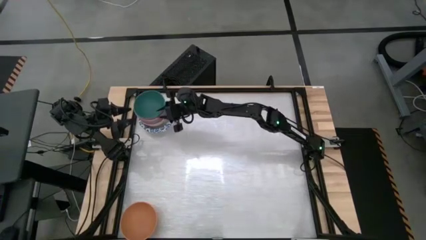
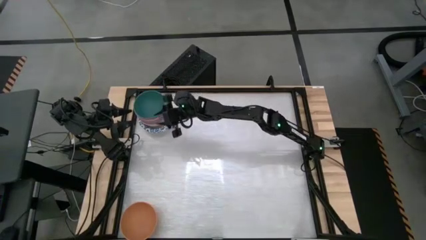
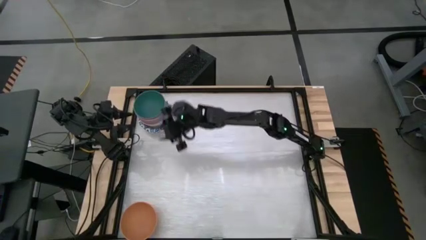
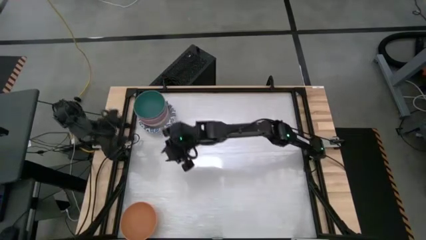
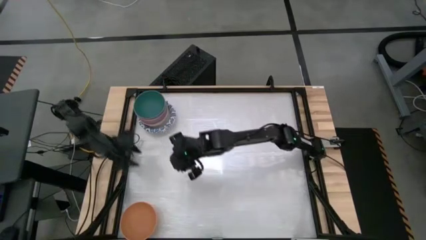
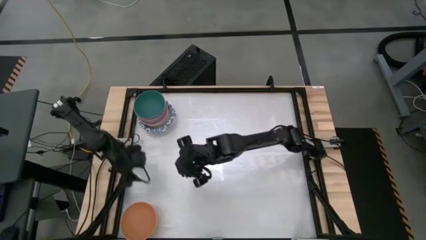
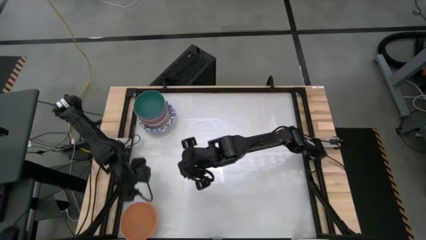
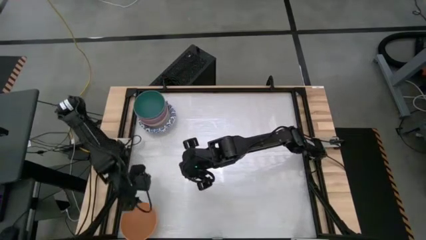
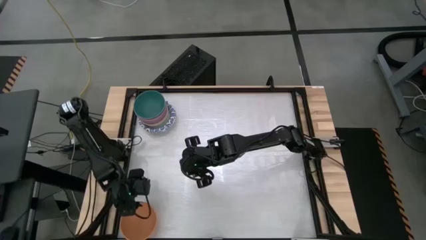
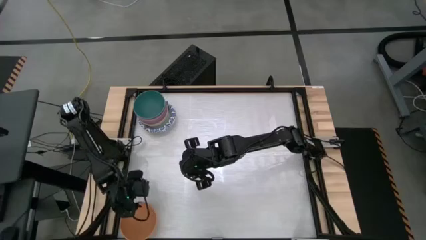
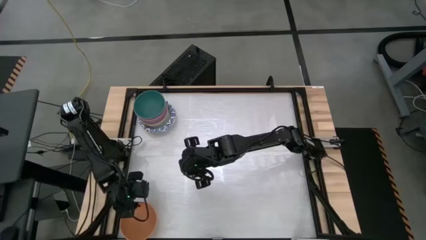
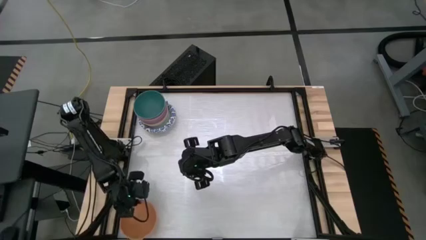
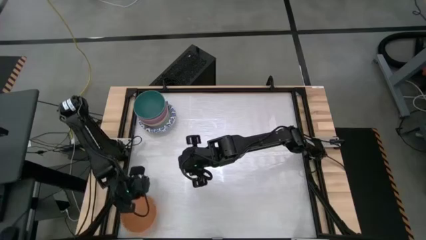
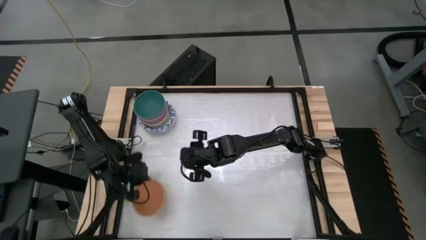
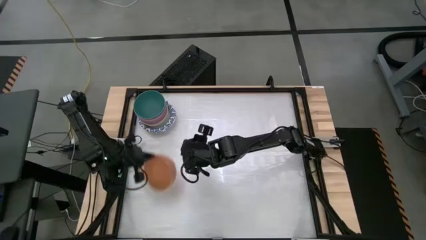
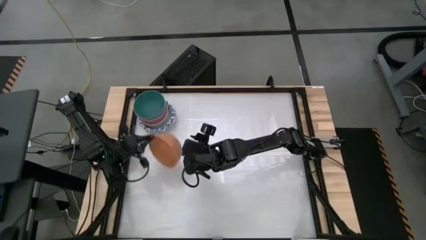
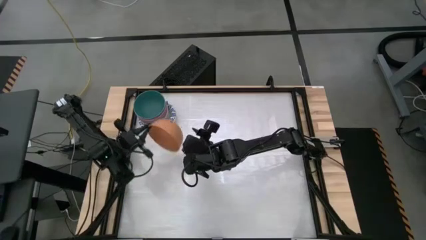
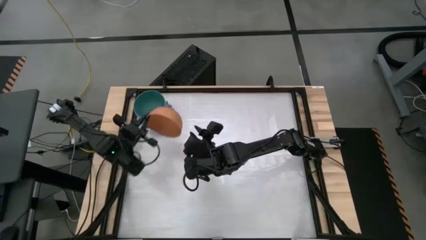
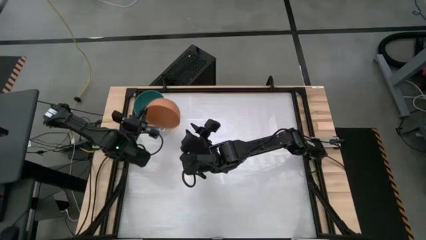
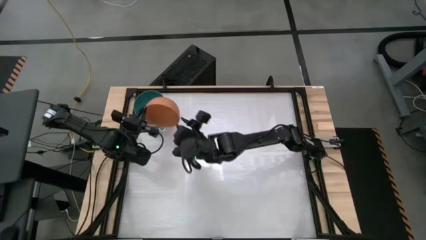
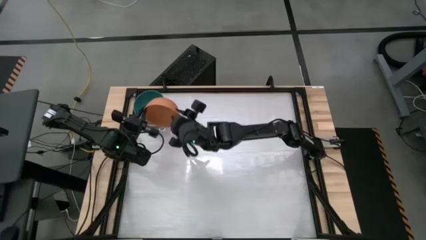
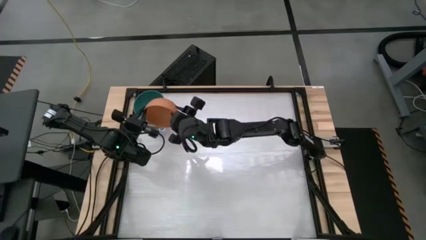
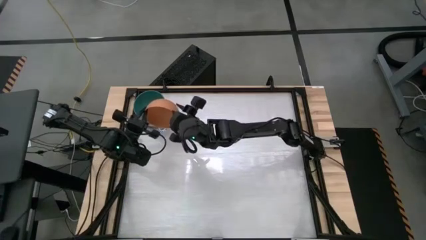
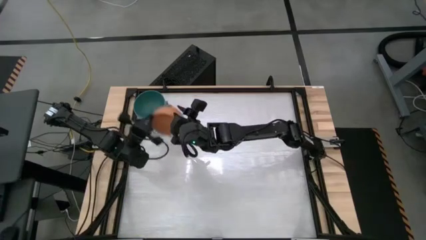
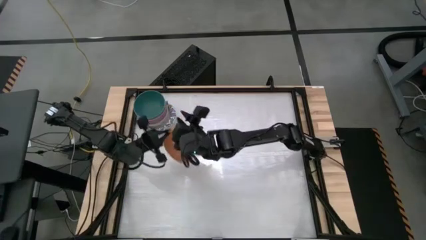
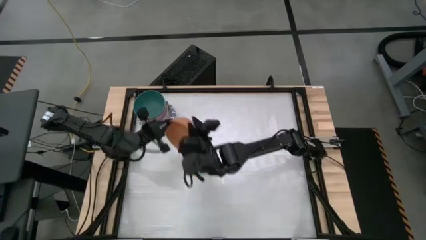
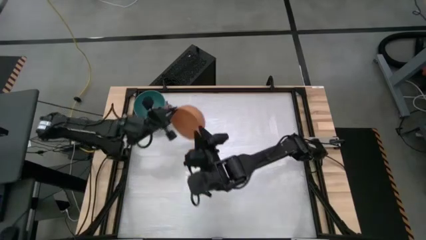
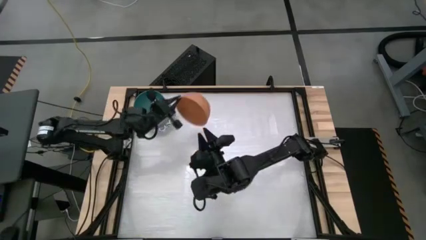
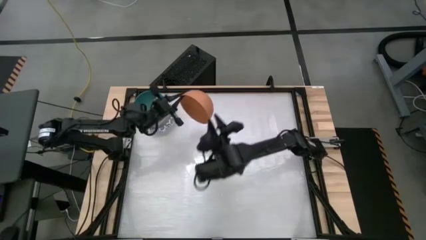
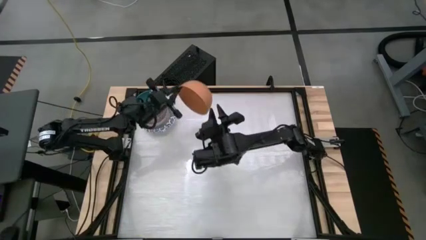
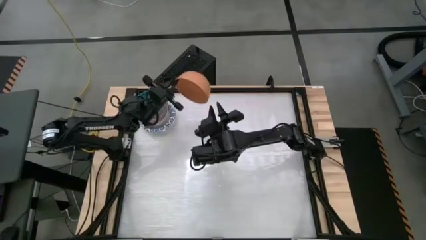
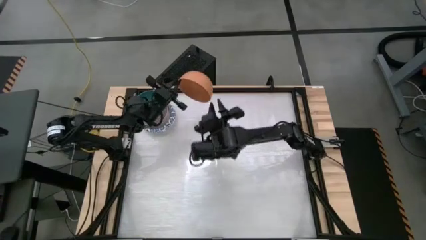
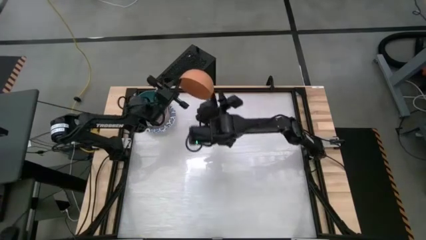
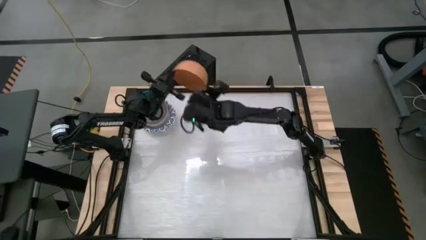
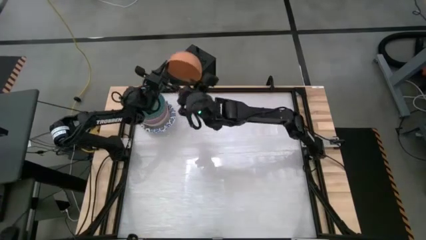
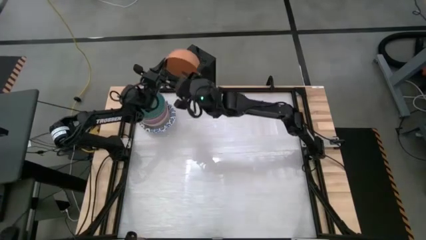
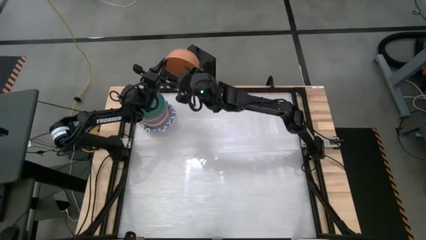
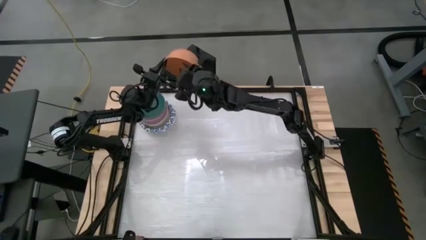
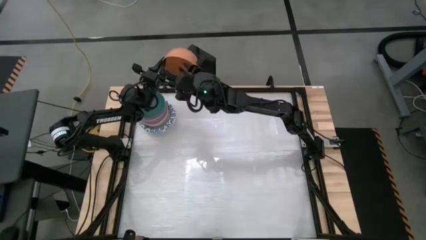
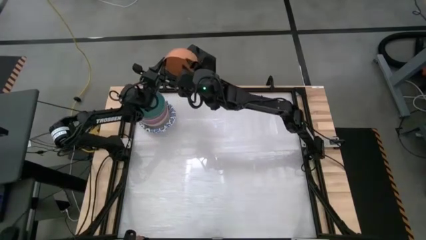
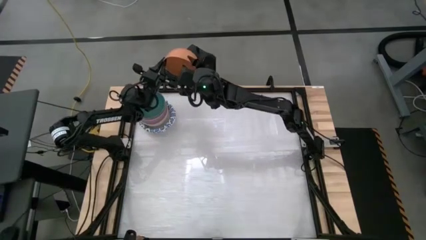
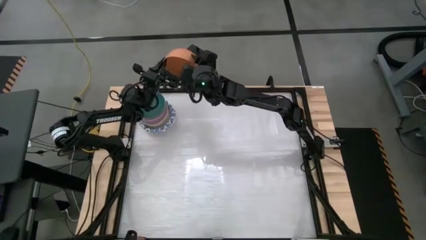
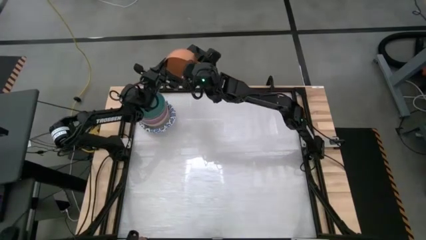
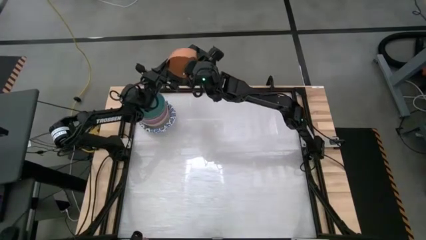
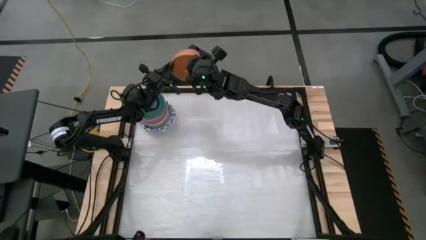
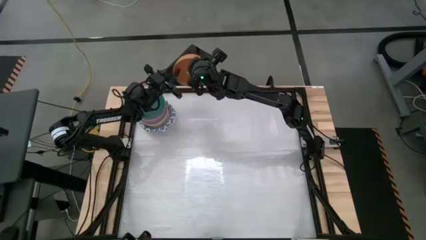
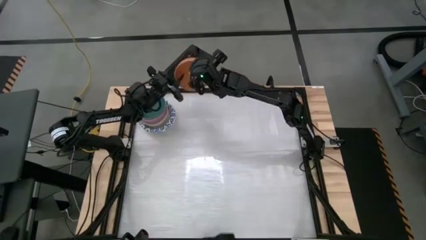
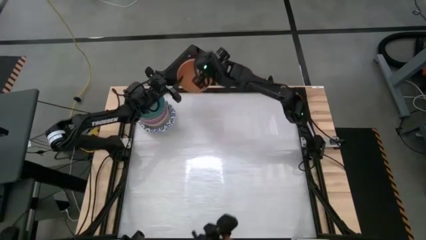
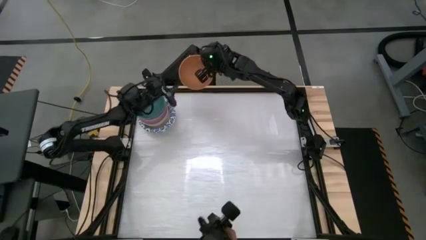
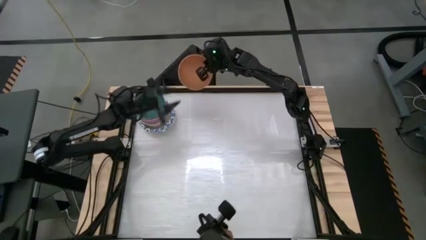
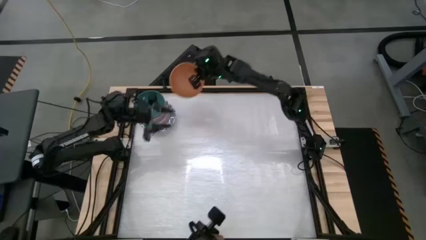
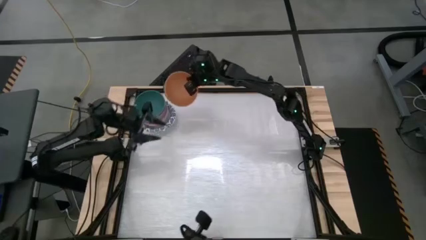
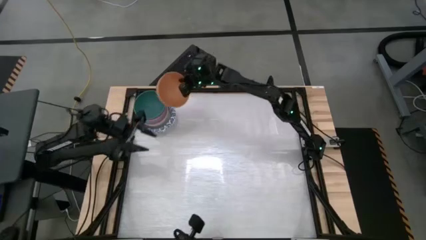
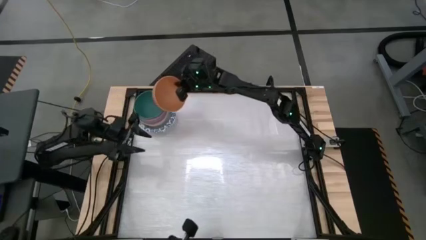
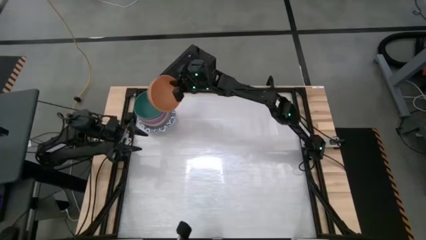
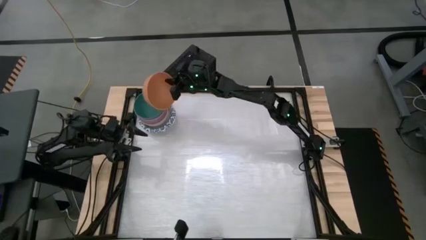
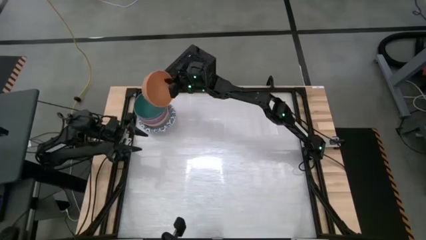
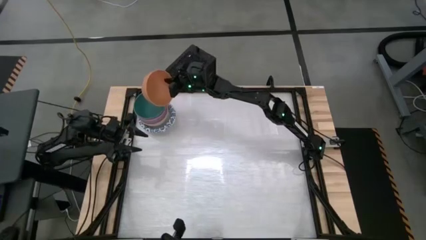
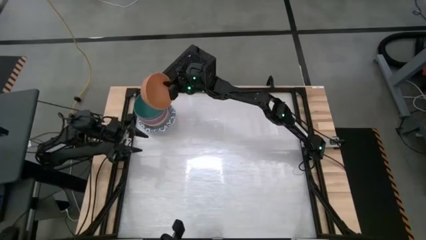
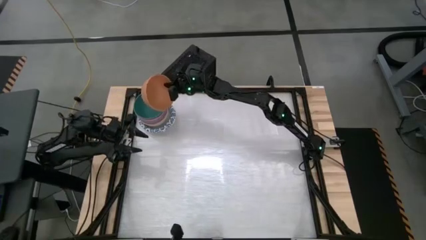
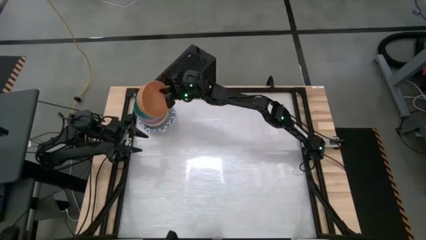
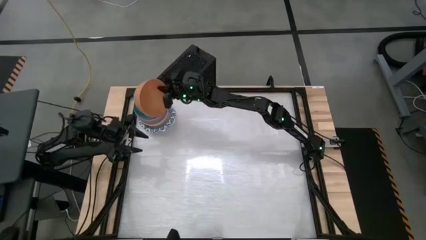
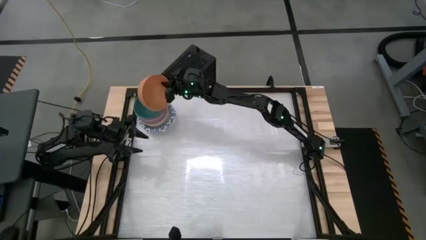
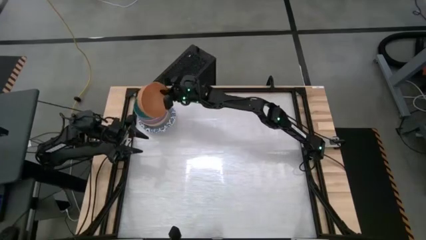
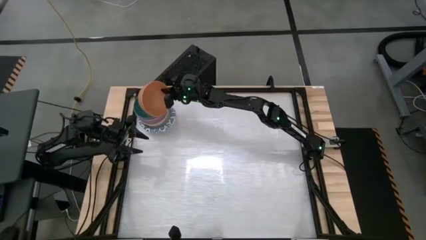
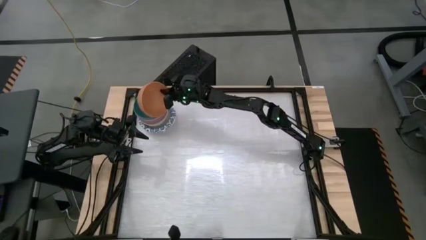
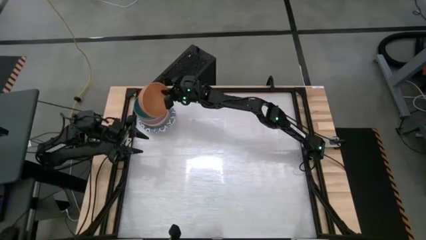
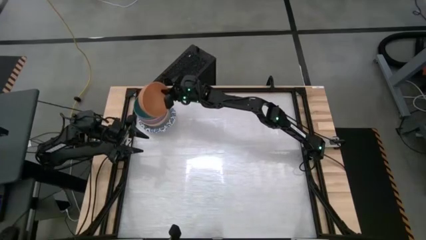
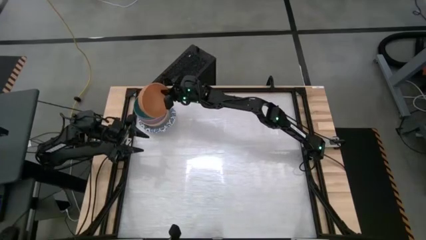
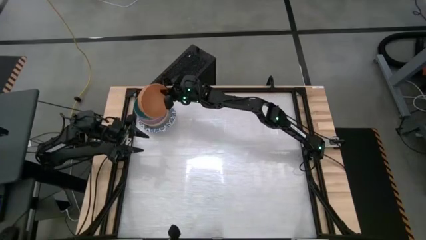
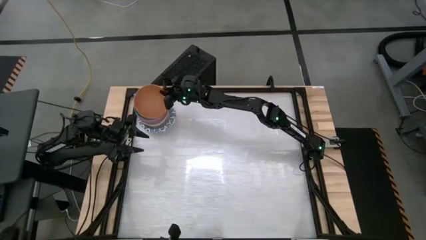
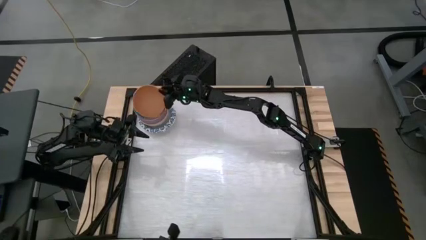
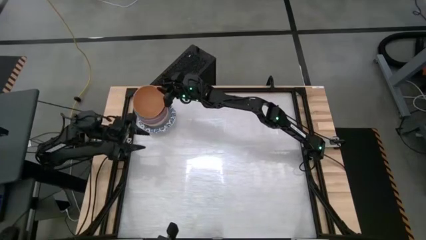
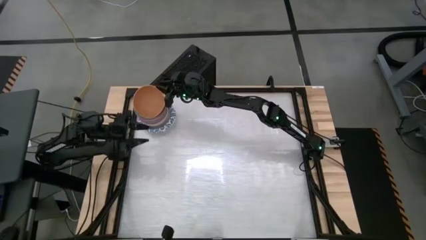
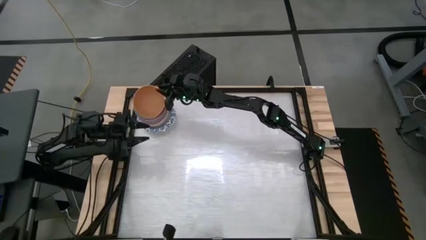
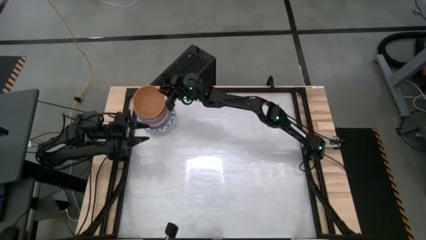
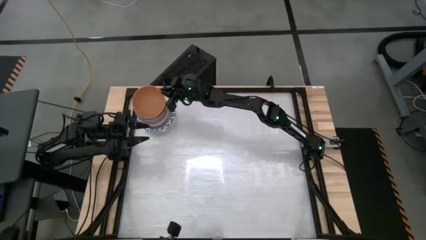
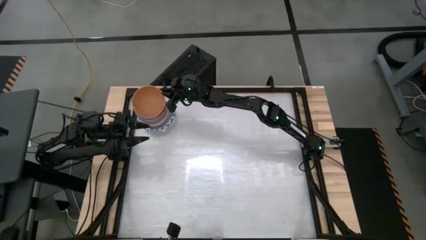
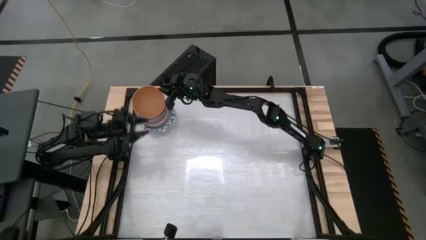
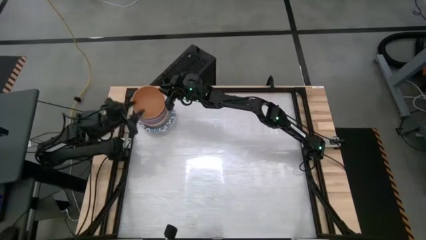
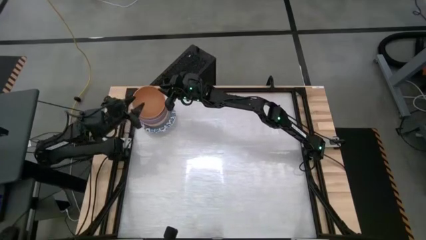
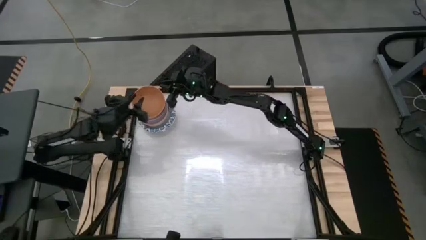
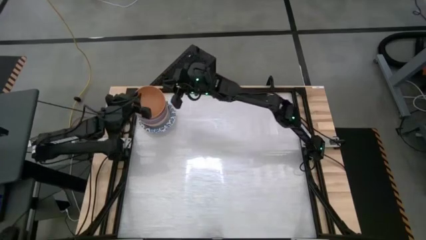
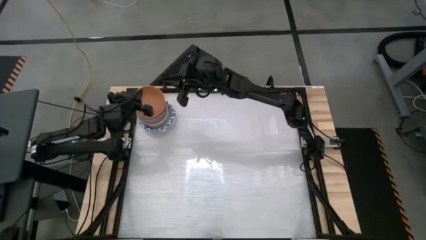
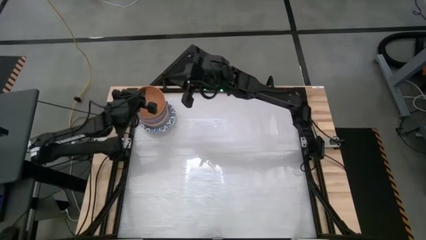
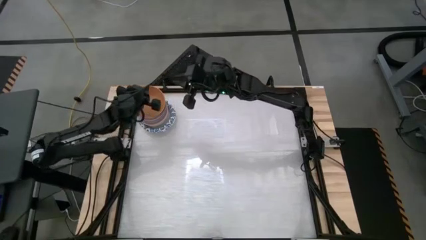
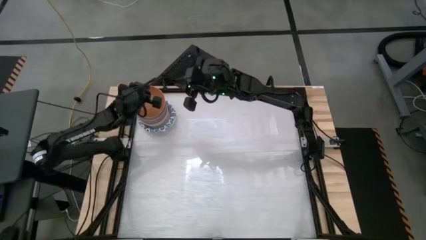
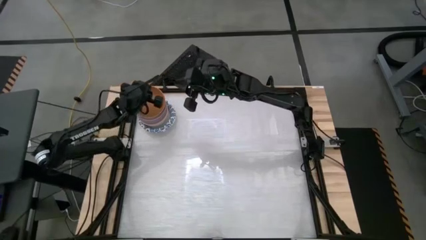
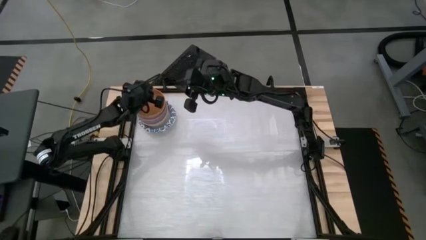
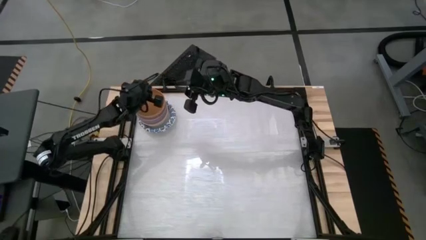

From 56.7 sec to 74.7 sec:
Stack the orange bowl on top of the green bowl
